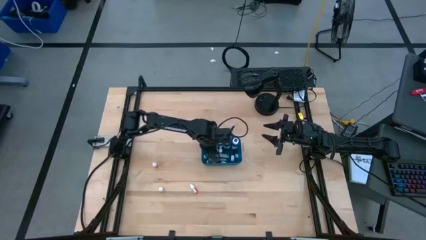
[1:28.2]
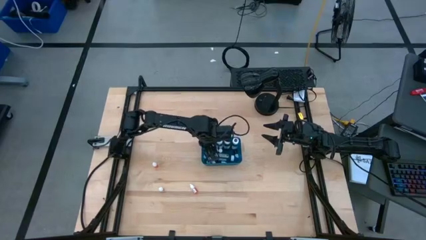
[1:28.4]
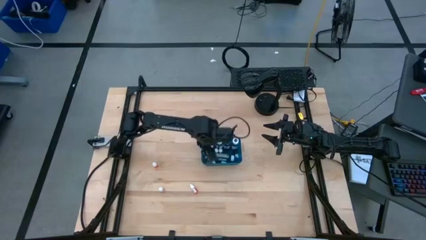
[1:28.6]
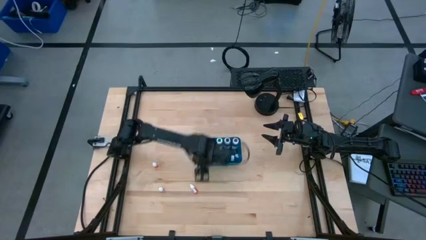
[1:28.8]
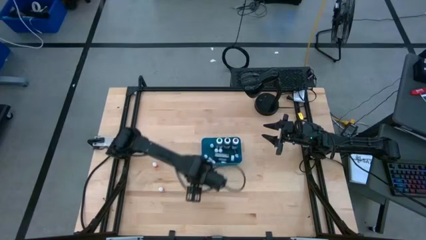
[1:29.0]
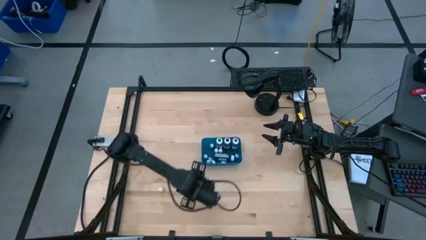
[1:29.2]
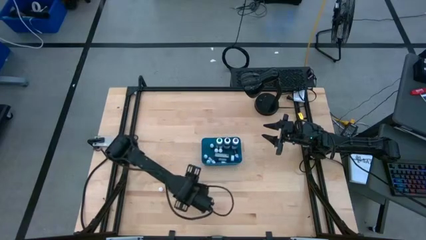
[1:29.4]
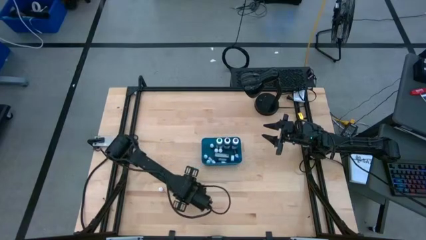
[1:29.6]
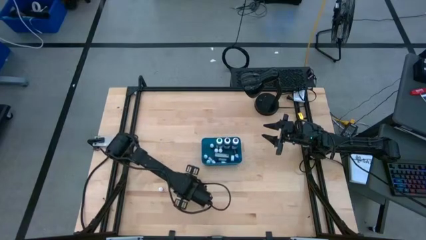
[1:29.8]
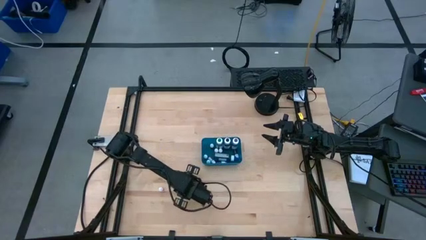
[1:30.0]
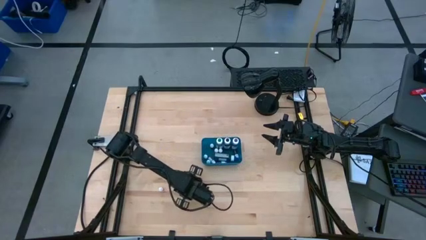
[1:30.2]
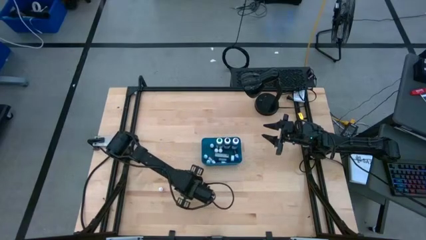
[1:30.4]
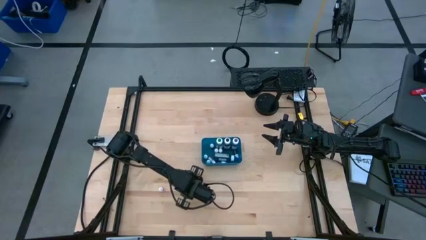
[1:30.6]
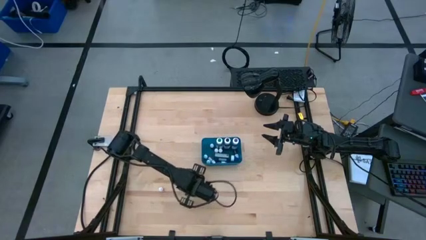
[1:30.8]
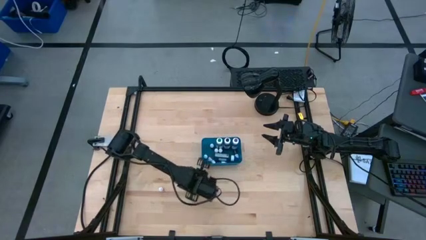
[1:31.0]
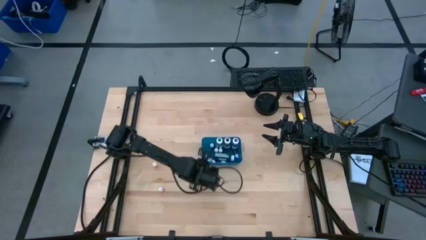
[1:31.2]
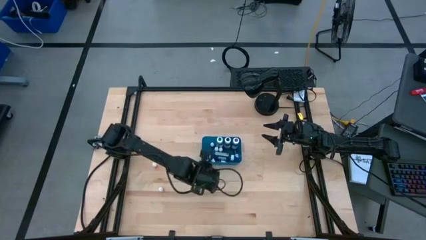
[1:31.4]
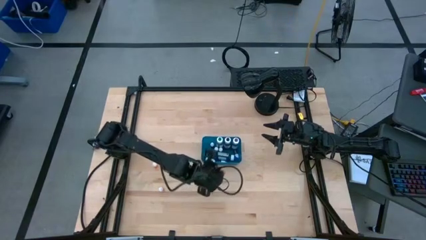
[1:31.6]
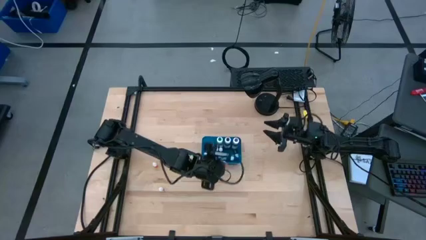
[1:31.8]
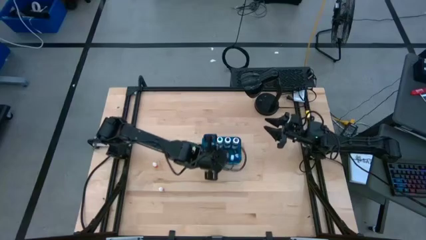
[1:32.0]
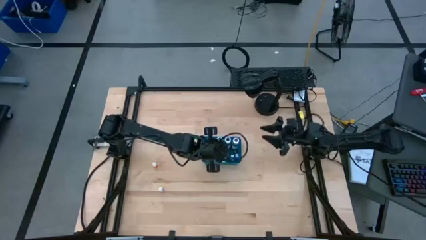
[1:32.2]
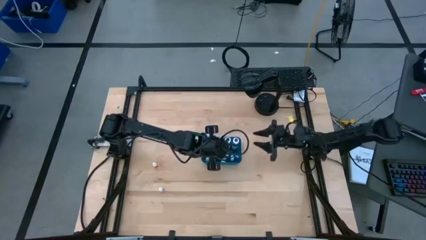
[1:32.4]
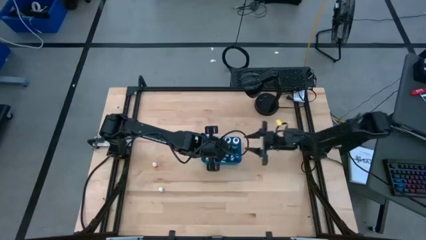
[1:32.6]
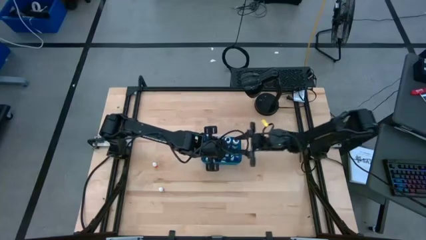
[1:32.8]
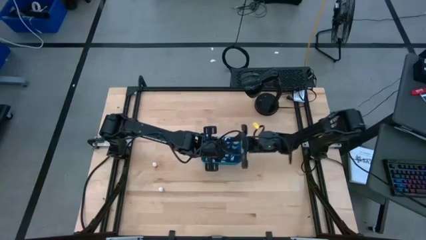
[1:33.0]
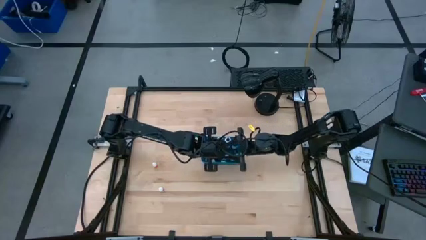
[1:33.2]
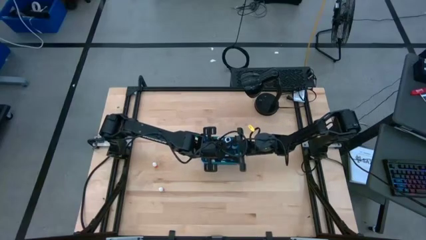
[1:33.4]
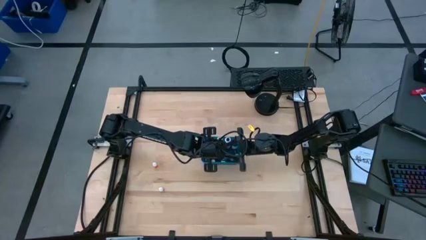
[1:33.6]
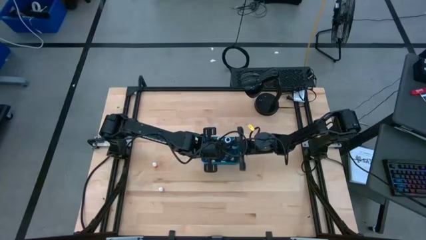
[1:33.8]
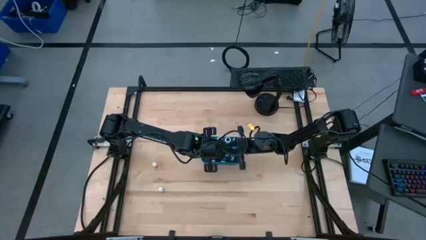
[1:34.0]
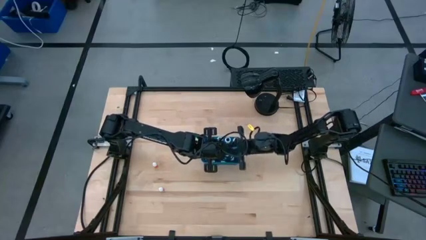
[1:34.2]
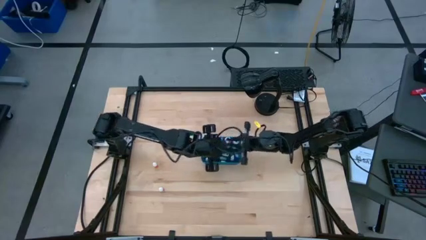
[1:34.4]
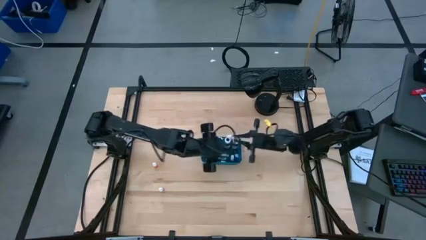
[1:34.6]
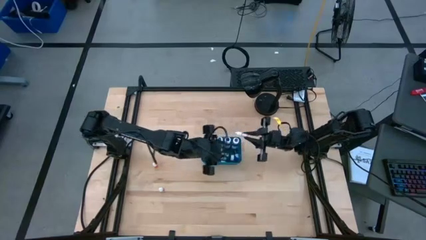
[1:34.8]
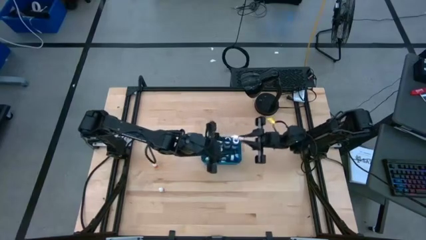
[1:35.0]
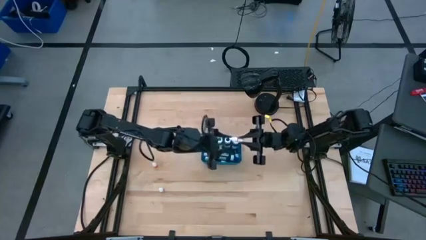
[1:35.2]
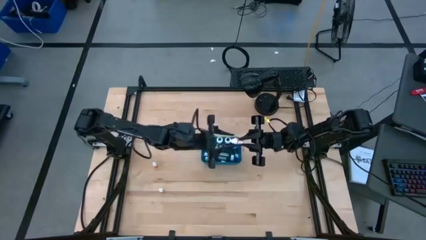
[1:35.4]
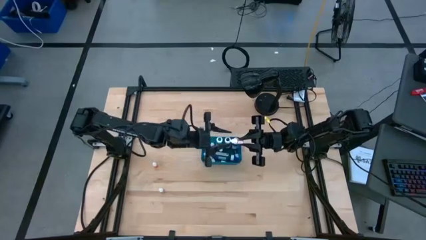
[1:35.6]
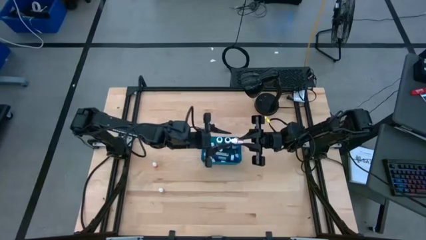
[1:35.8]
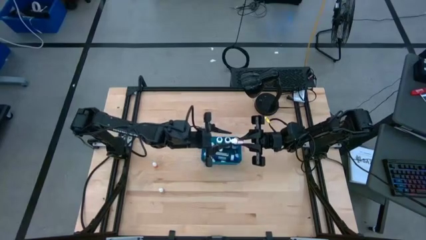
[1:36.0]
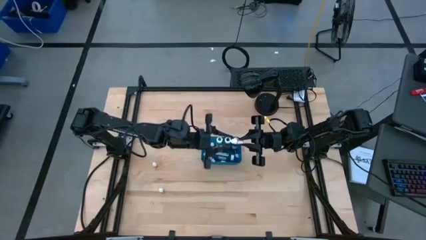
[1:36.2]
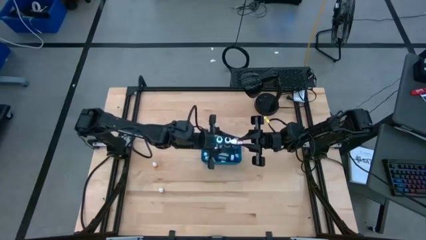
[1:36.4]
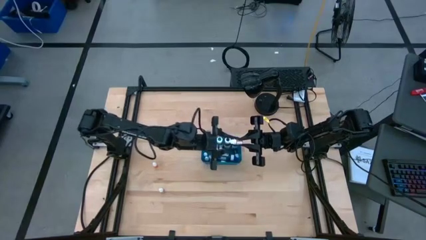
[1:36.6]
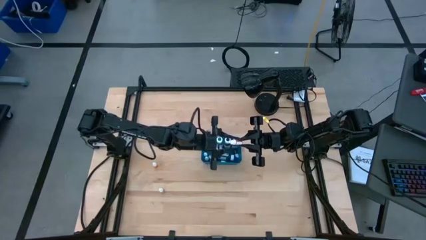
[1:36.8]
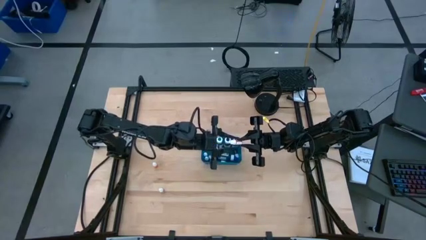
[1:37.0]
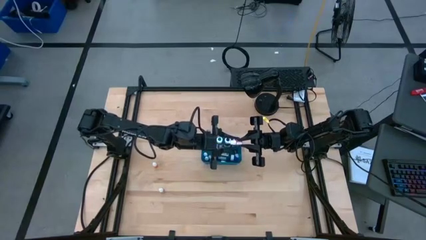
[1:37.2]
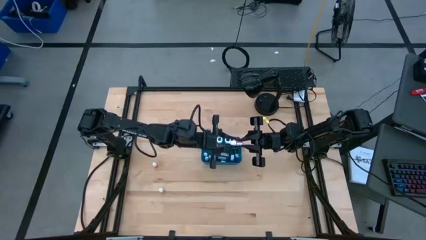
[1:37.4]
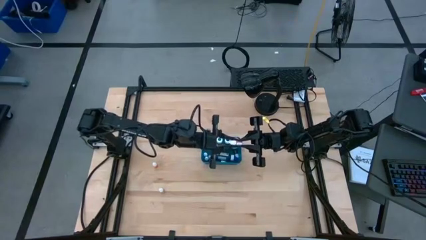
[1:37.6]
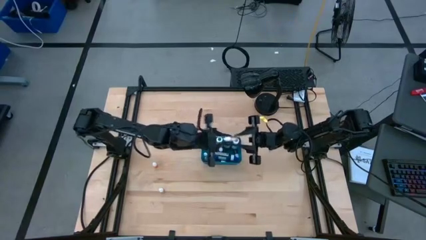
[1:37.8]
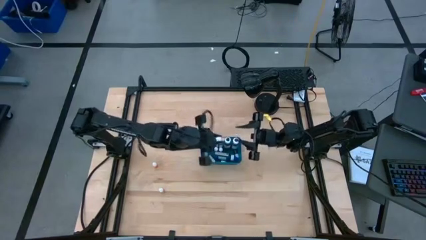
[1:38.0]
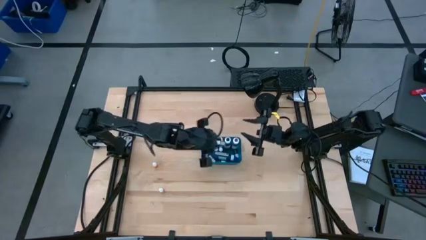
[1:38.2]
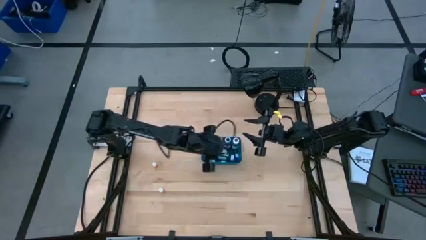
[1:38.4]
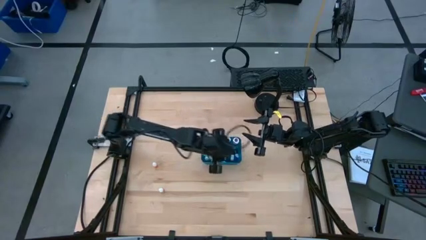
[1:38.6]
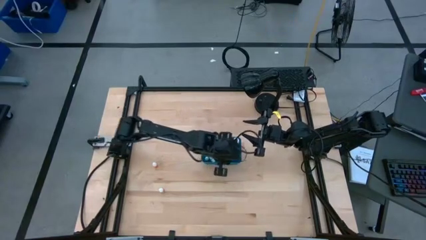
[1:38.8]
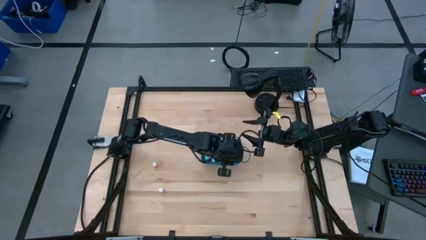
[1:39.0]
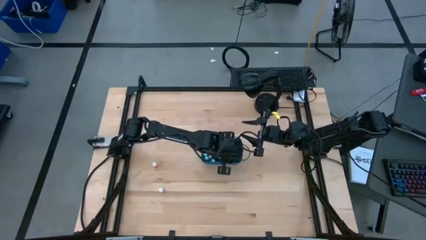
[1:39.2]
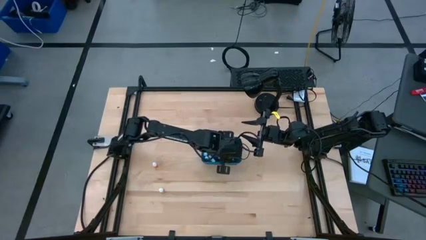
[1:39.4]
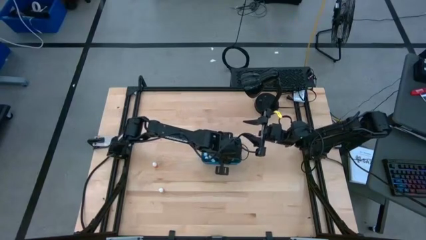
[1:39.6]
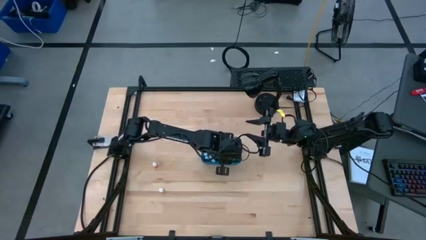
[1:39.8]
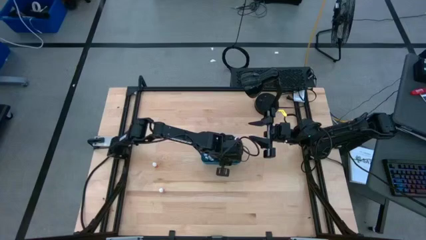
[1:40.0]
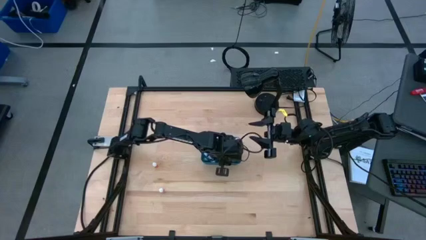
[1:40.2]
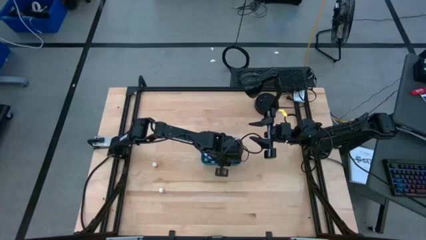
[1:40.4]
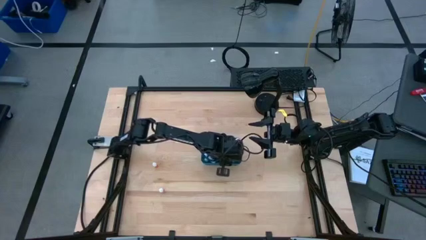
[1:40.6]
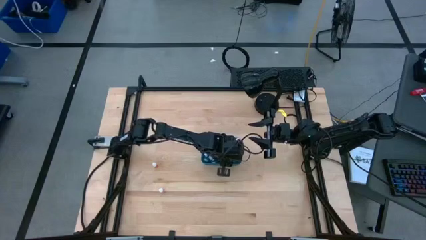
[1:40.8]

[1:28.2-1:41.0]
Task: Pick & Place food coloring
Put the small yellow food coloring bottle into the blue container
